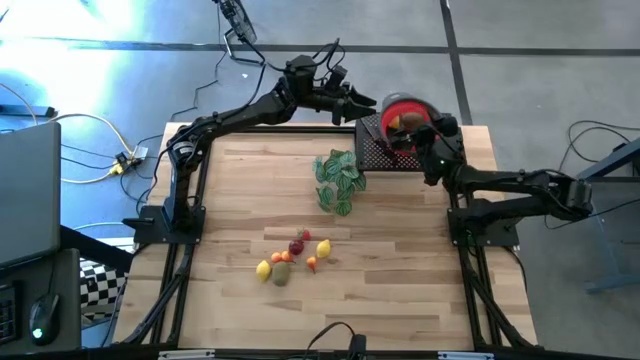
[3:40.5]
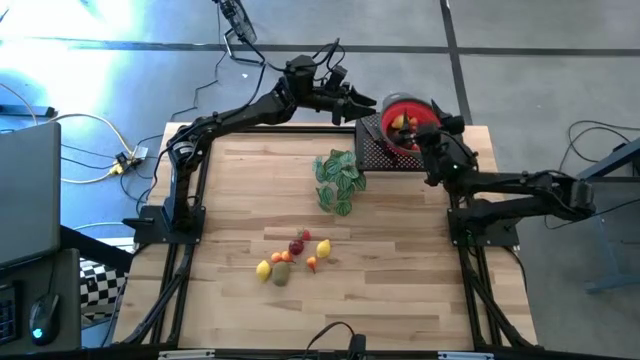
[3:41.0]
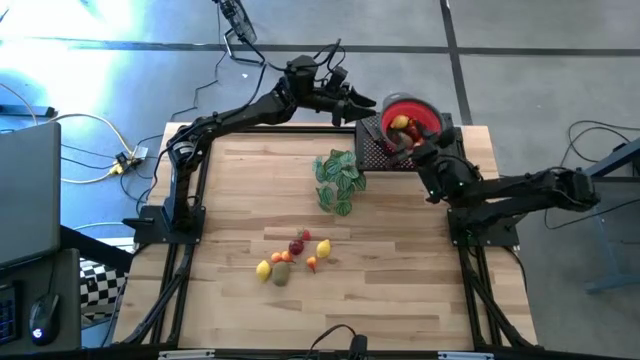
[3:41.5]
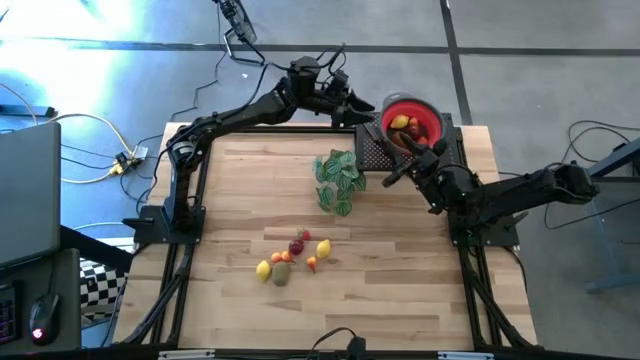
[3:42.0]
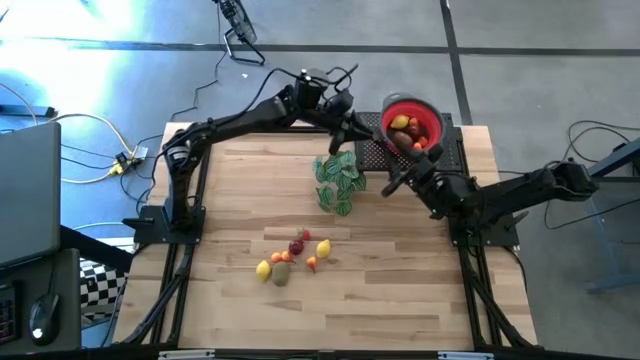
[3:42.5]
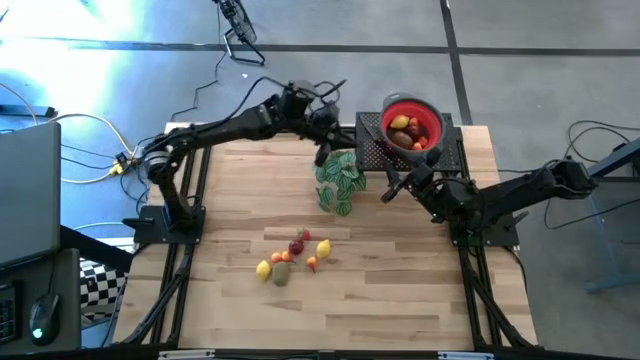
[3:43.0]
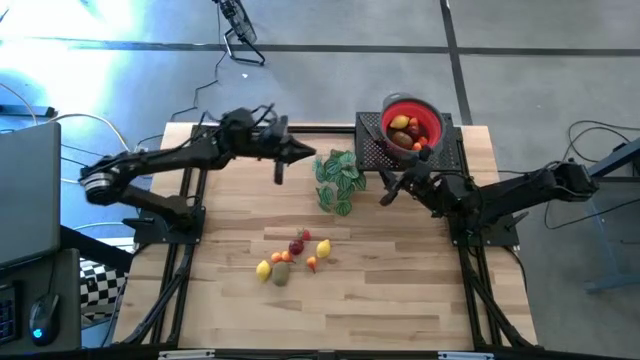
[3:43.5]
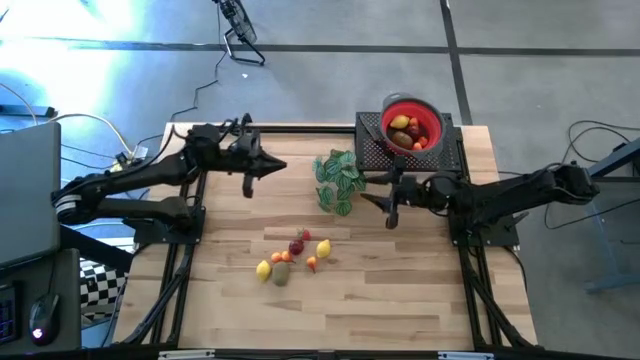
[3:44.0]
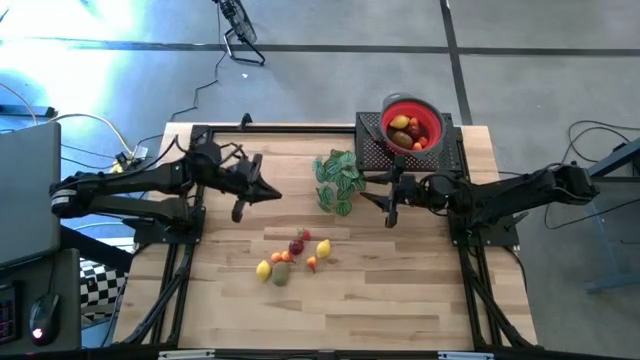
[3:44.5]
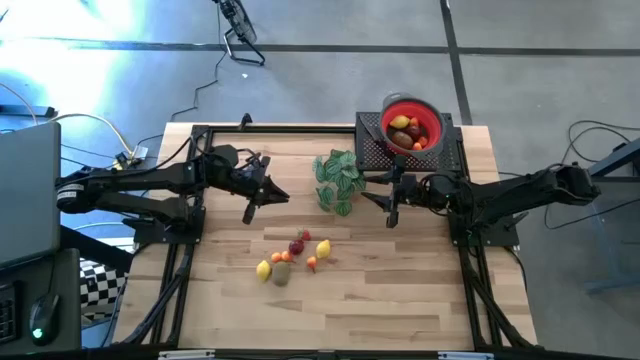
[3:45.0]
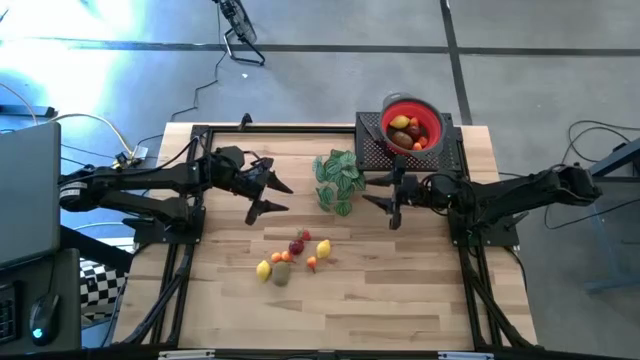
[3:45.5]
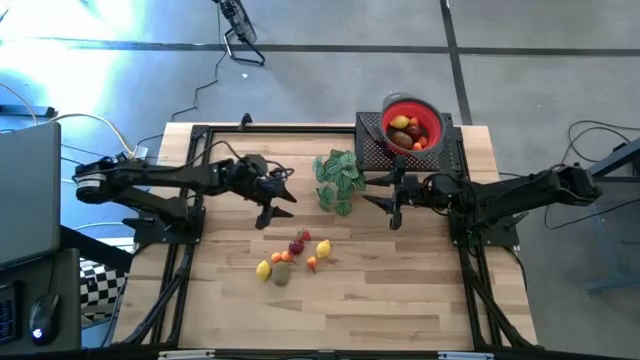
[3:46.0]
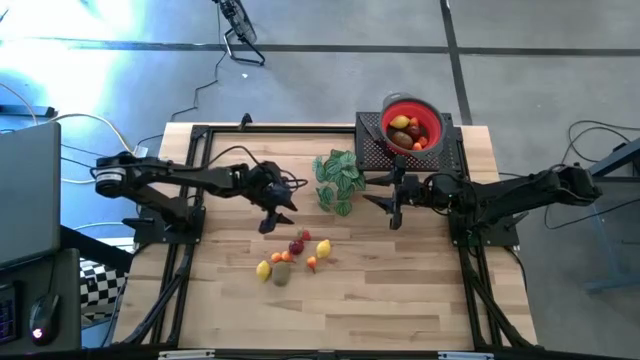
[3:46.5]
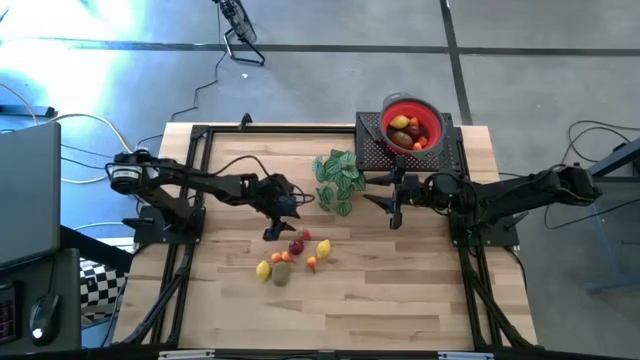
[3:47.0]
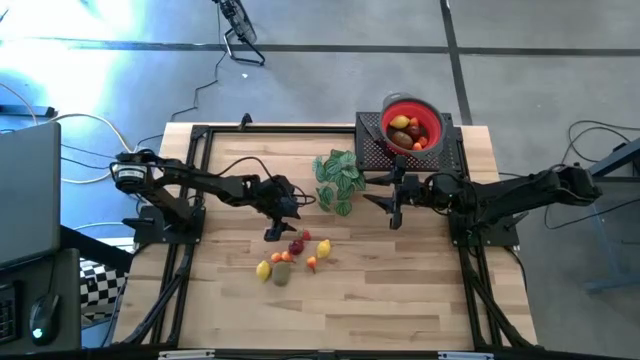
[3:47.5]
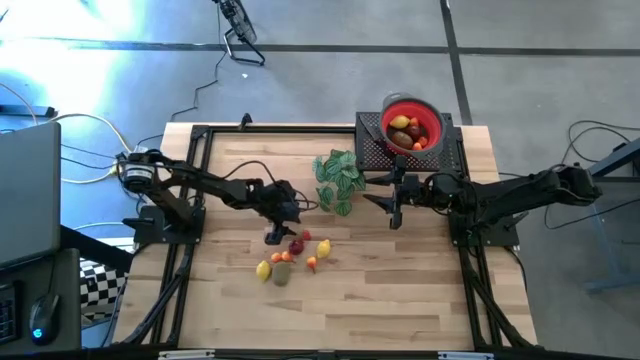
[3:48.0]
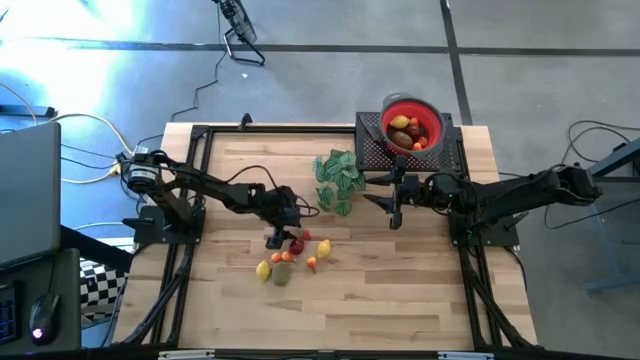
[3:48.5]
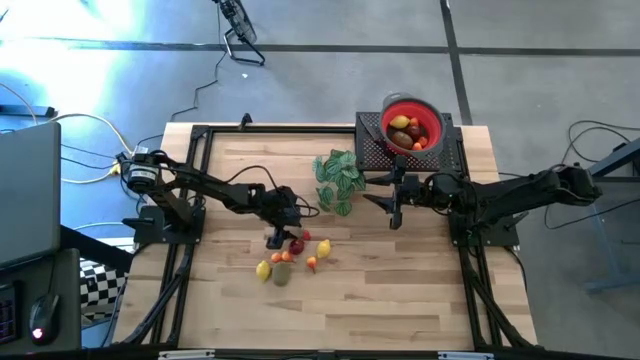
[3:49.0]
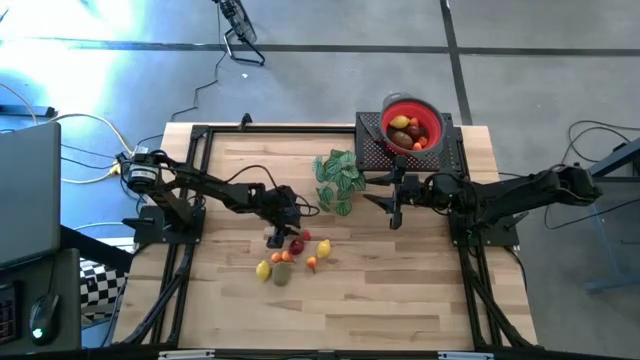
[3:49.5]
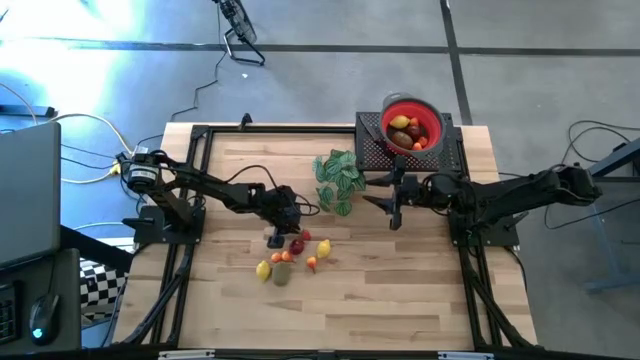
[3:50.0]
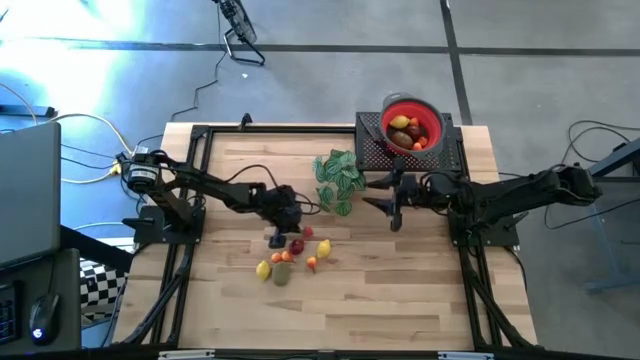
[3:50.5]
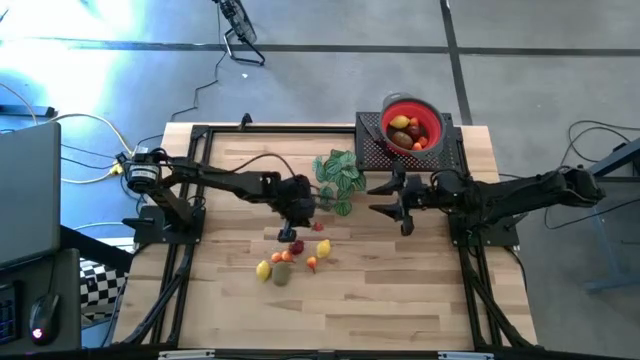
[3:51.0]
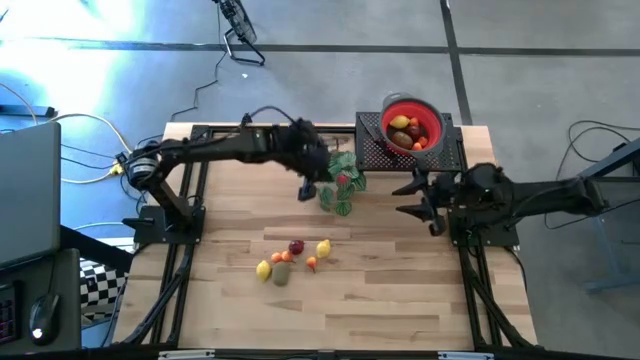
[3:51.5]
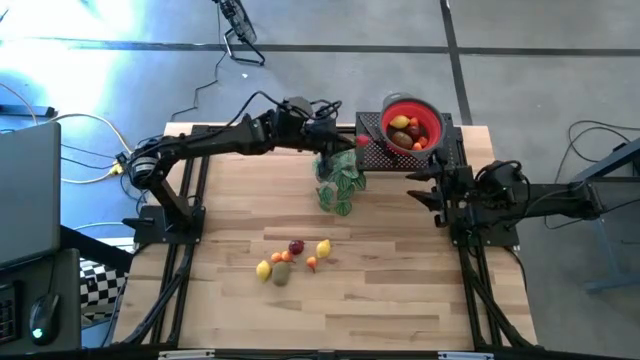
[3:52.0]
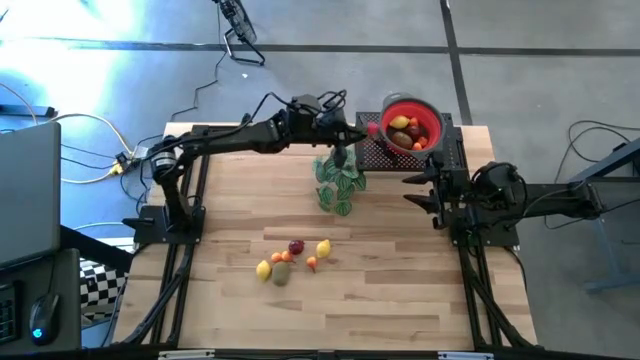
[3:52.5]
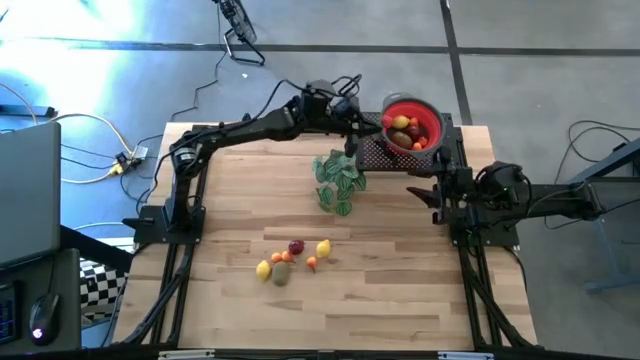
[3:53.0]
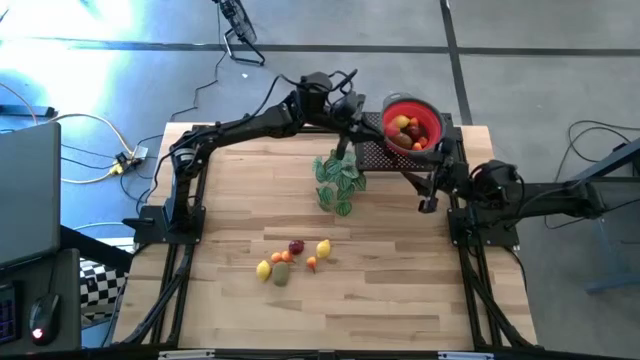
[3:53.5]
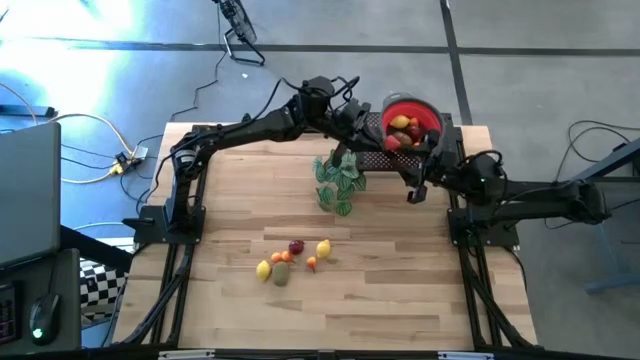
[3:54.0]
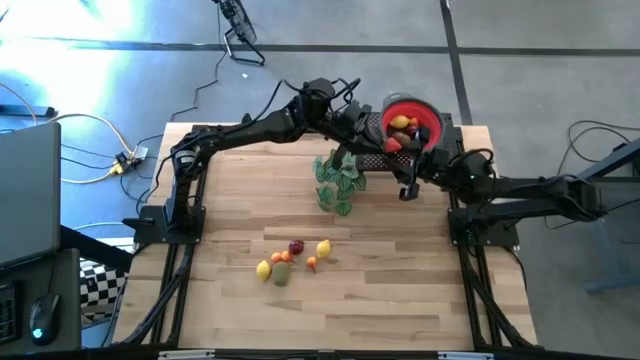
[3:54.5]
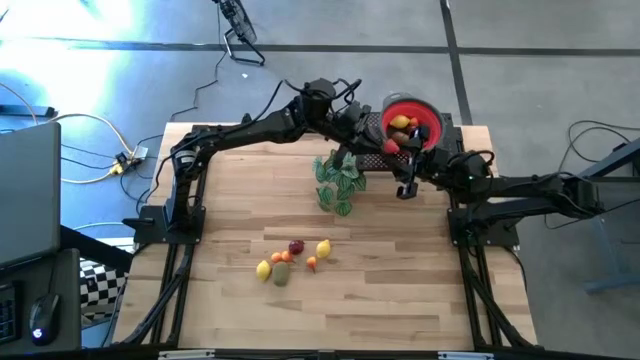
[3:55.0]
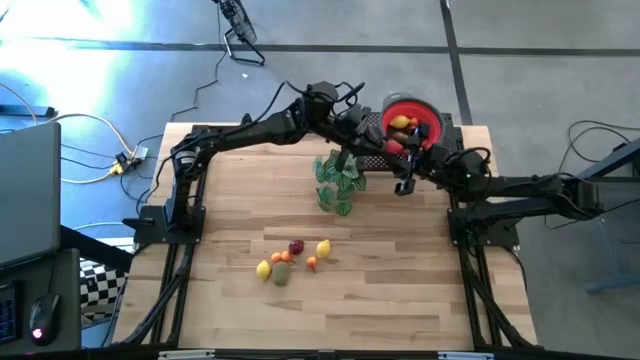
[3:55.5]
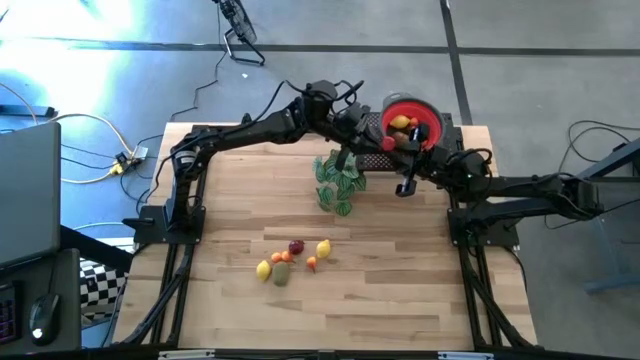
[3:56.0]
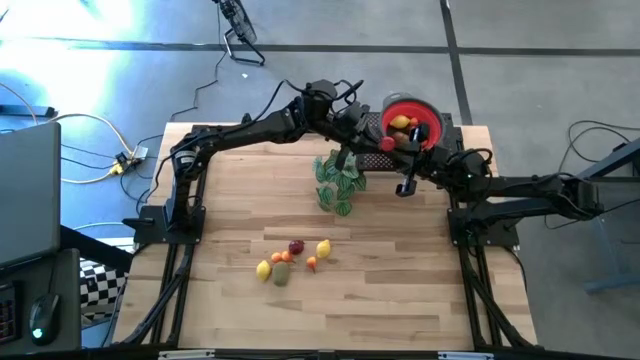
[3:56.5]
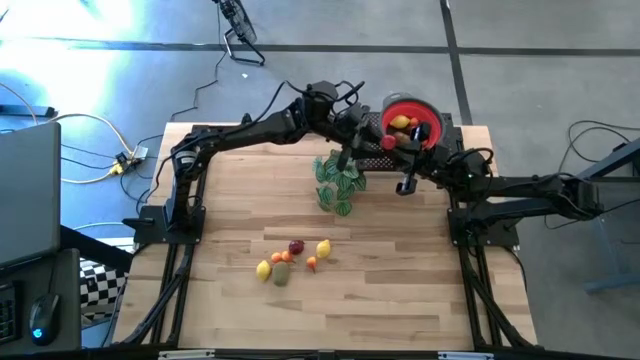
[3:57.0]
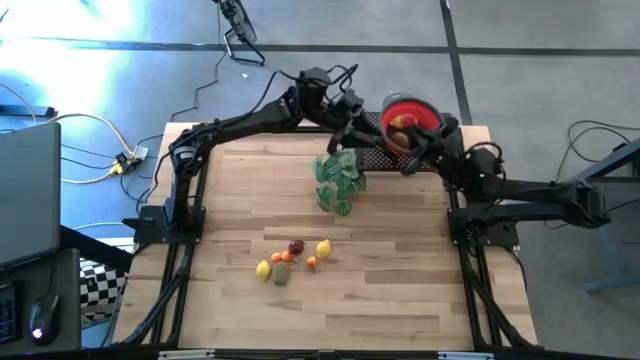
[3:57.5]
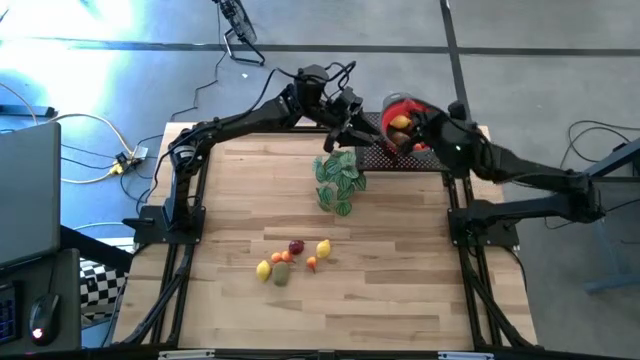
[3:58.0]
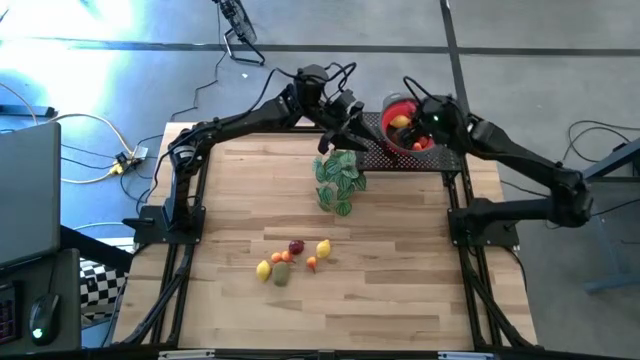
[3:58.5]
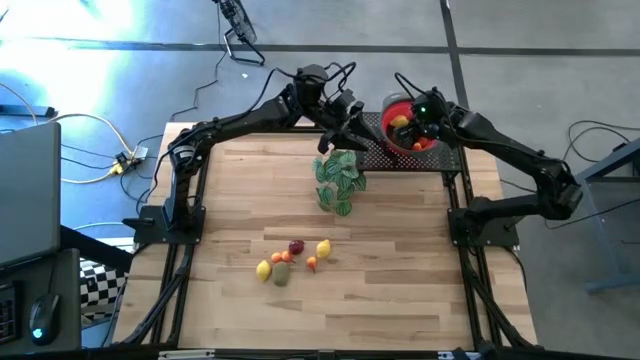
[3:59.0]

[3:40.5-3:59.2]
Task: Pick & Place Fruit
Put the strawberry into the red colander

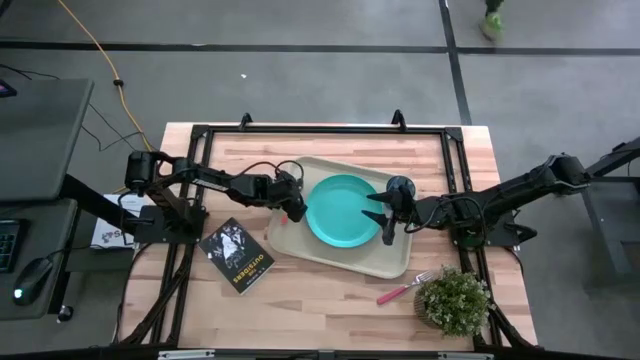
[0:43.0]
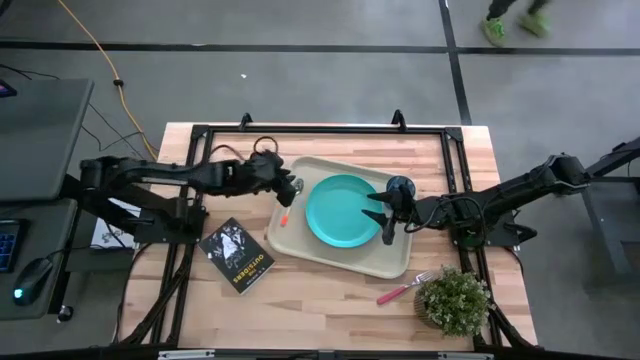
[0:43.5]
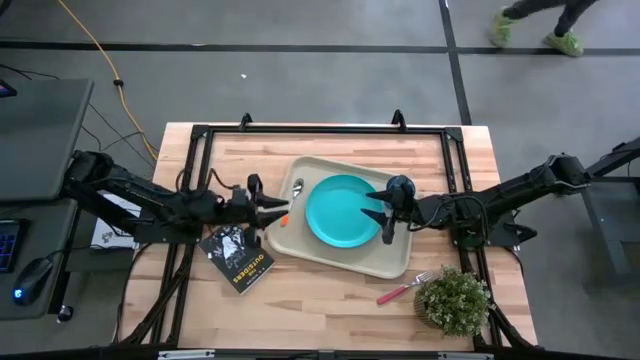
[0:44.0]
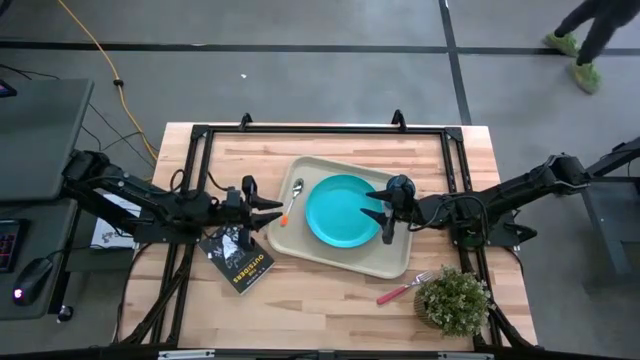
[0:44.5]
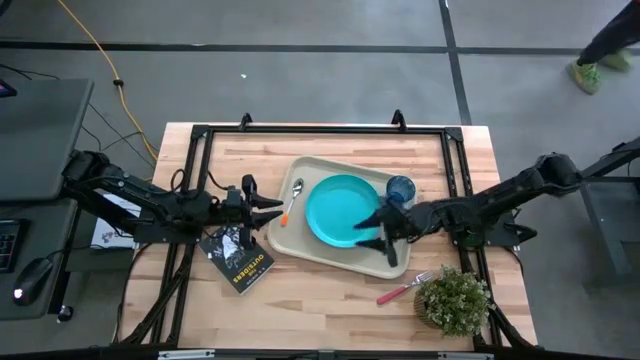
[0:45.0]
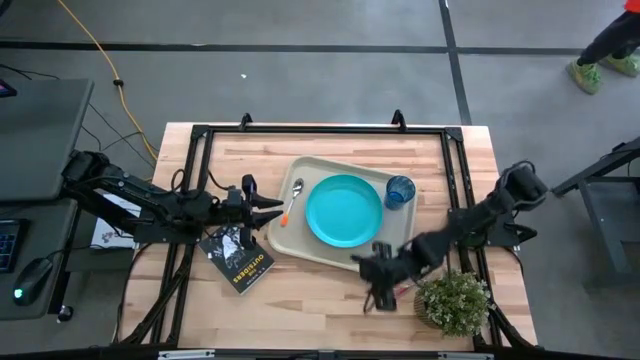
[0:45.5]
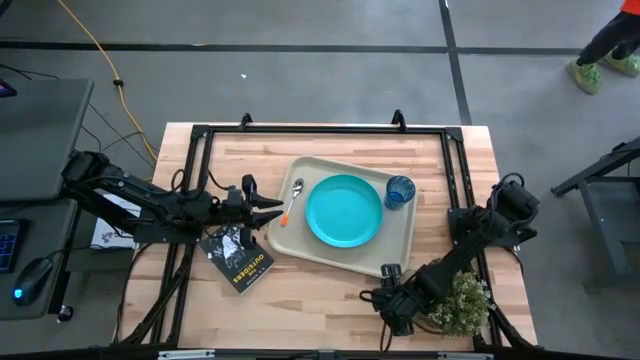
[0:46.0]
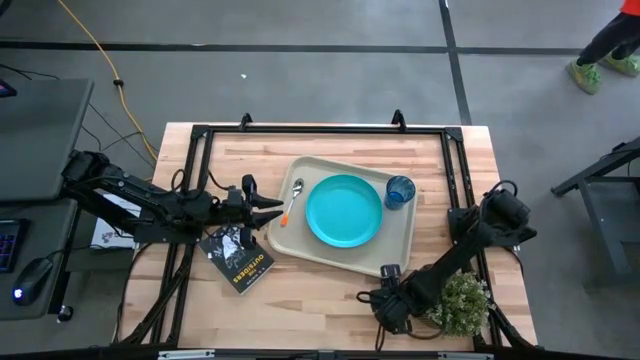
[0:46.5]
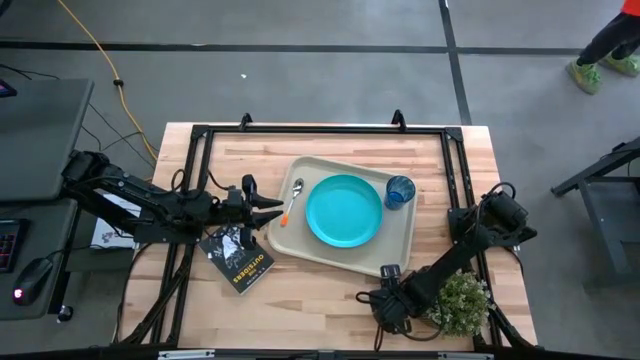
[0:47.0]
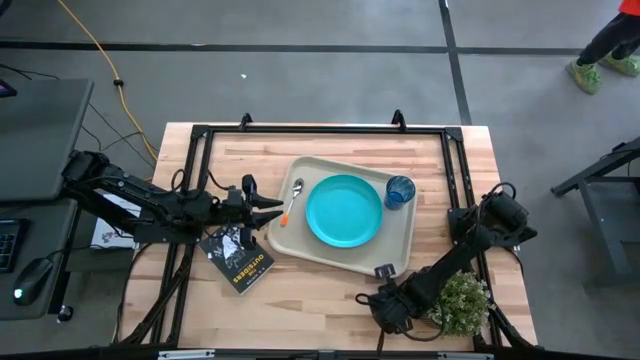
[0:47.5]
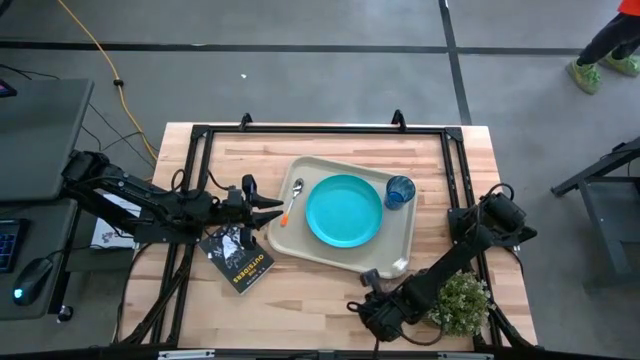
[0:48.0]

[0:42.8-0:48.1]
Task: Pick and place plate/cup/fork/spoon on tray
Put the pink fork on the gray serving tray to the right of the orange spoon
